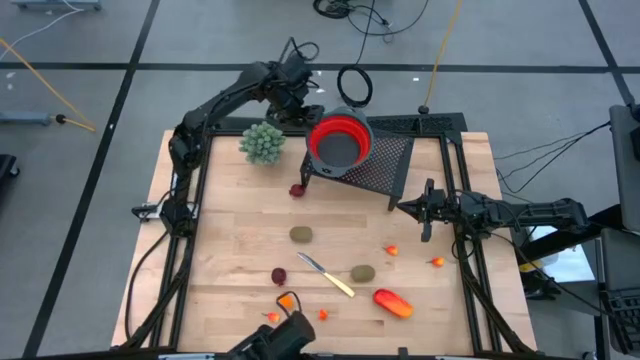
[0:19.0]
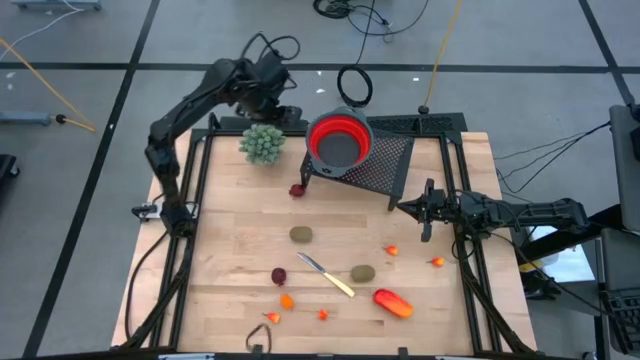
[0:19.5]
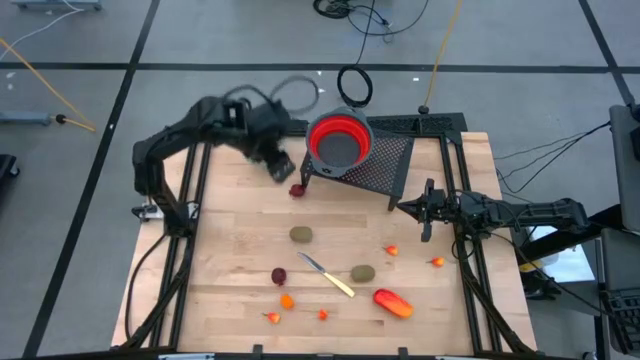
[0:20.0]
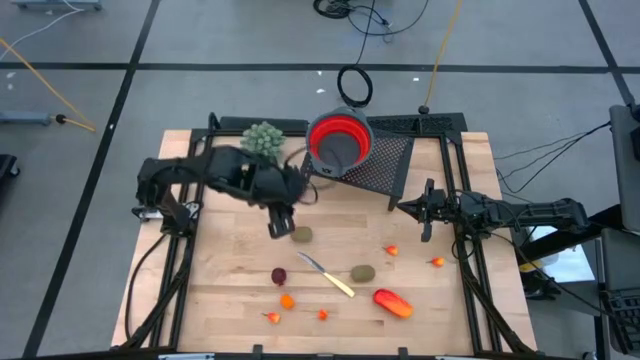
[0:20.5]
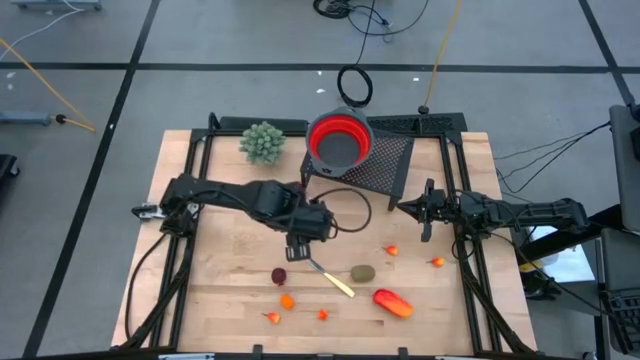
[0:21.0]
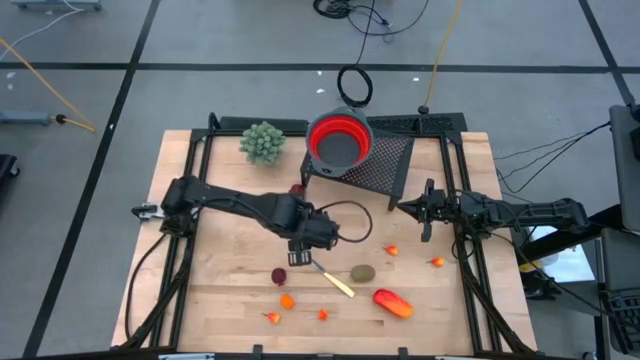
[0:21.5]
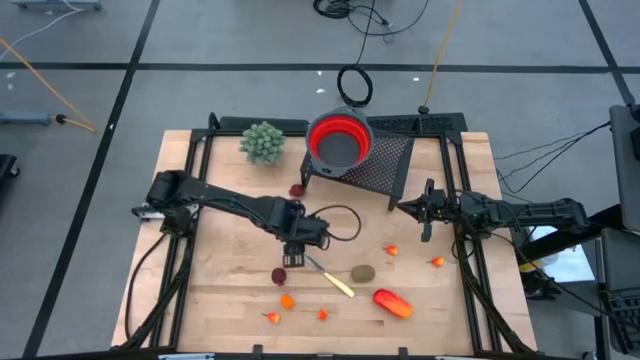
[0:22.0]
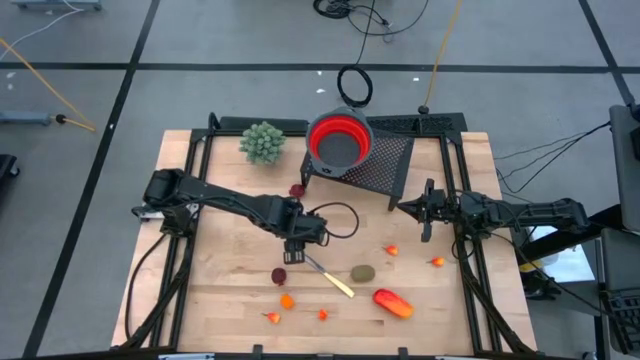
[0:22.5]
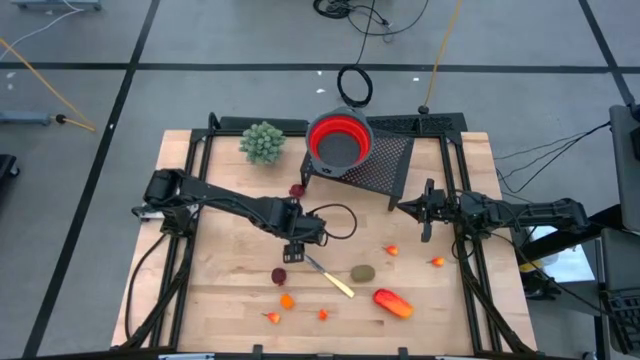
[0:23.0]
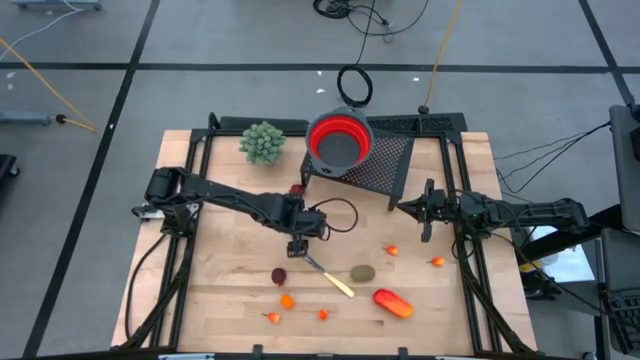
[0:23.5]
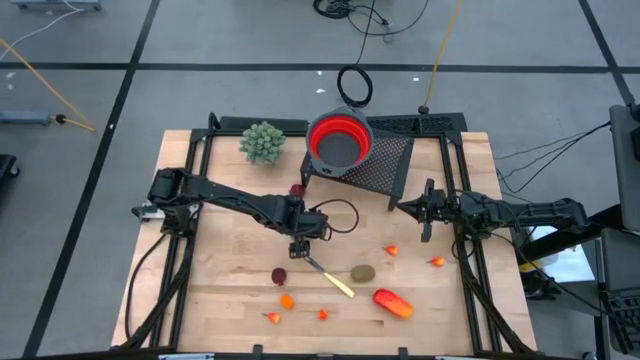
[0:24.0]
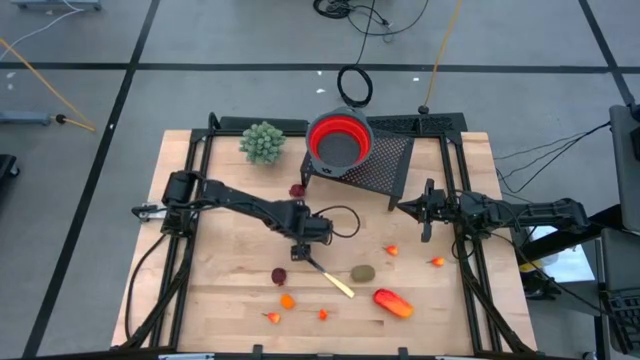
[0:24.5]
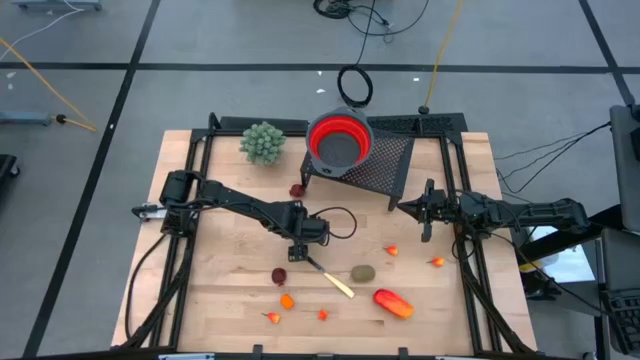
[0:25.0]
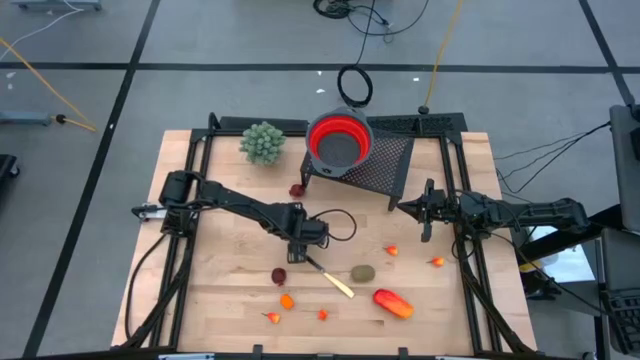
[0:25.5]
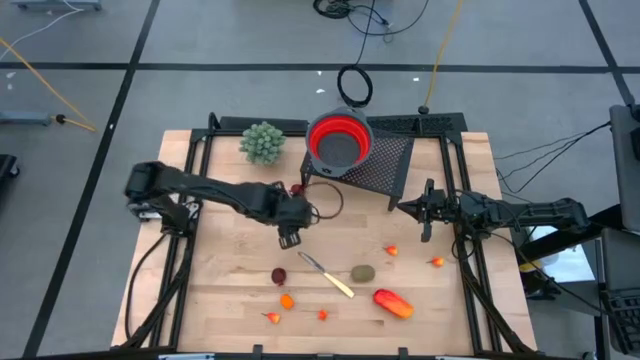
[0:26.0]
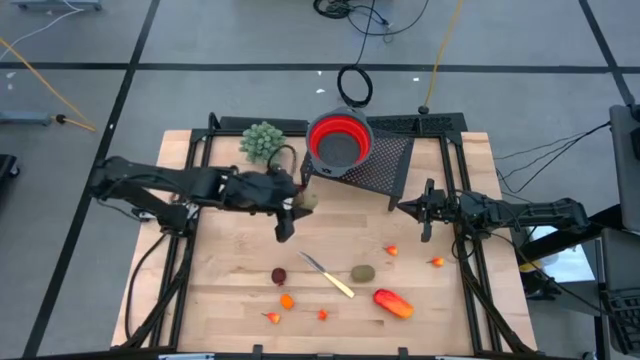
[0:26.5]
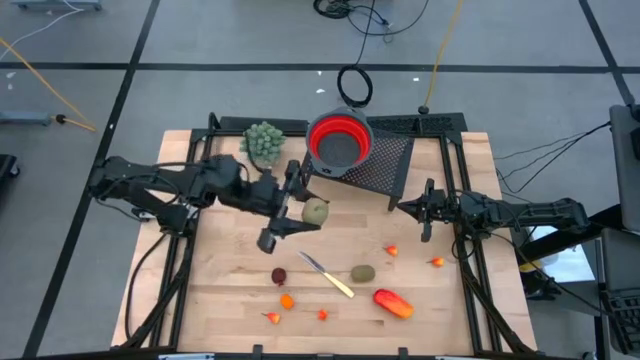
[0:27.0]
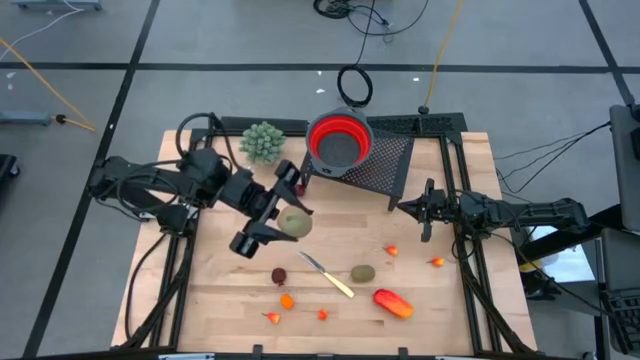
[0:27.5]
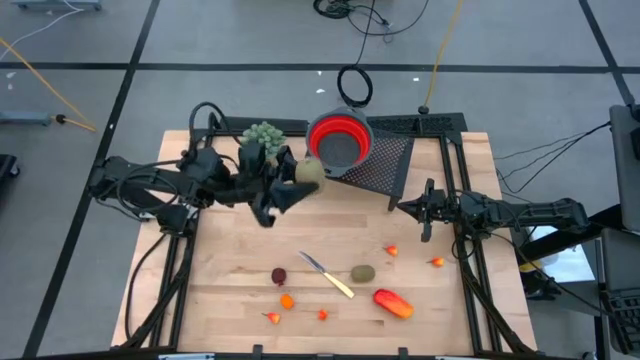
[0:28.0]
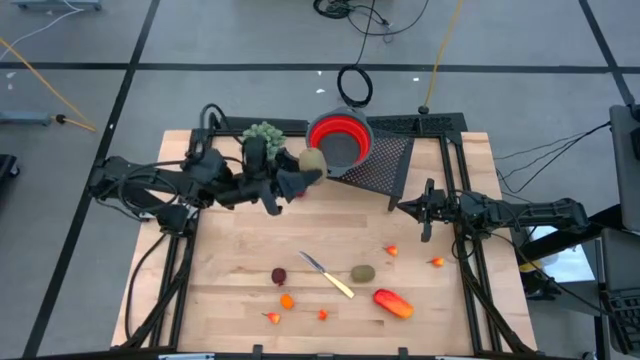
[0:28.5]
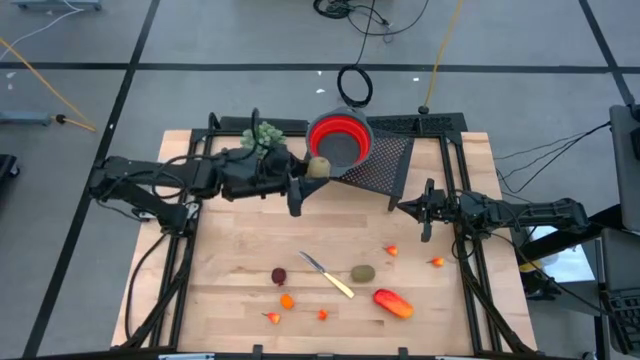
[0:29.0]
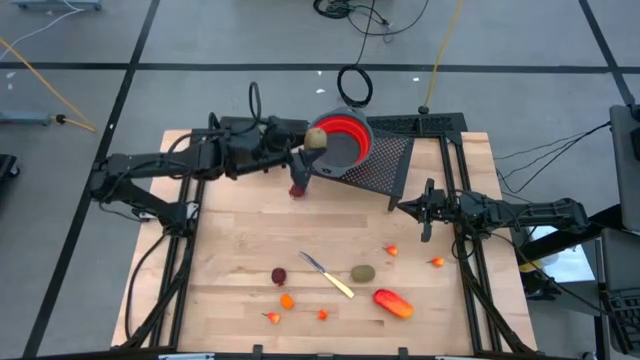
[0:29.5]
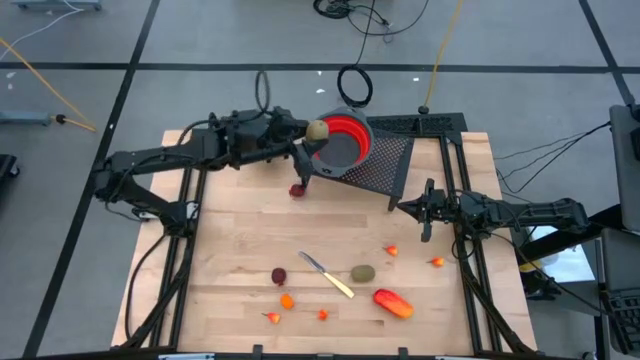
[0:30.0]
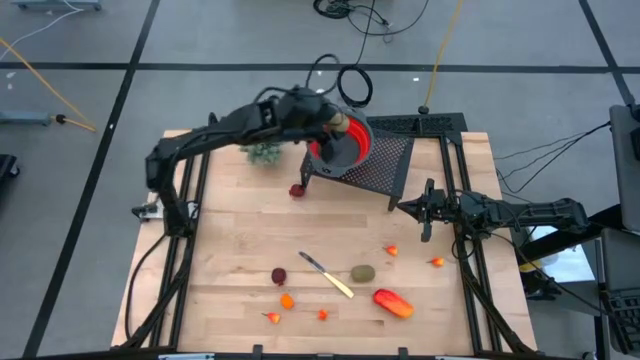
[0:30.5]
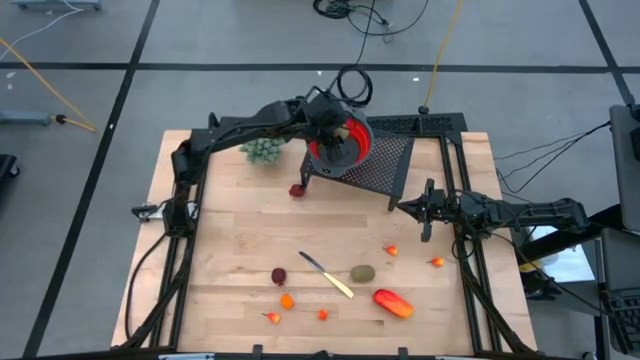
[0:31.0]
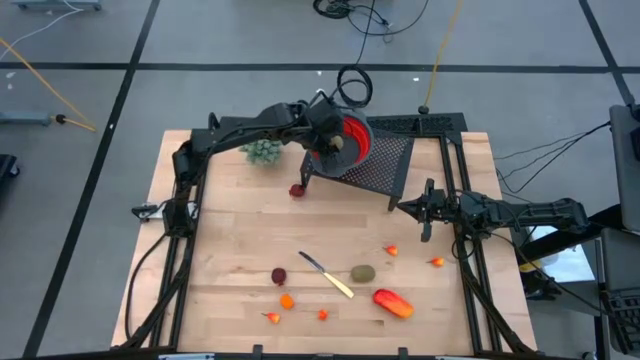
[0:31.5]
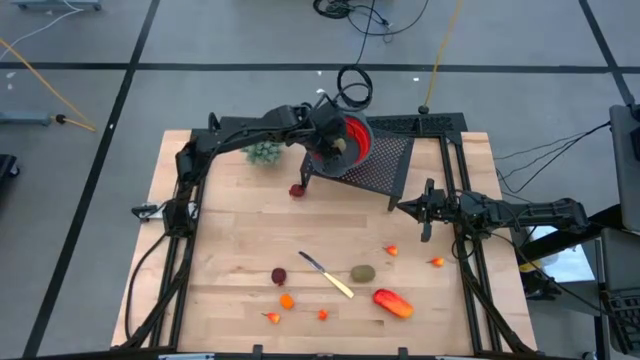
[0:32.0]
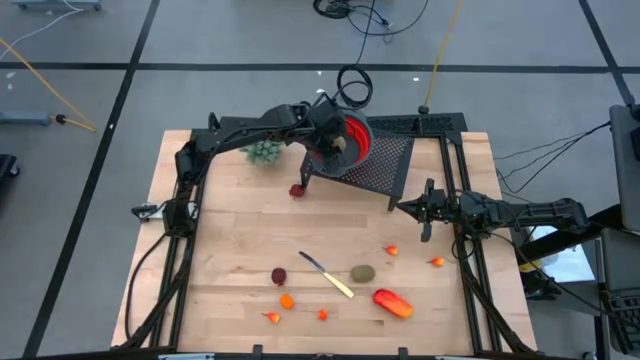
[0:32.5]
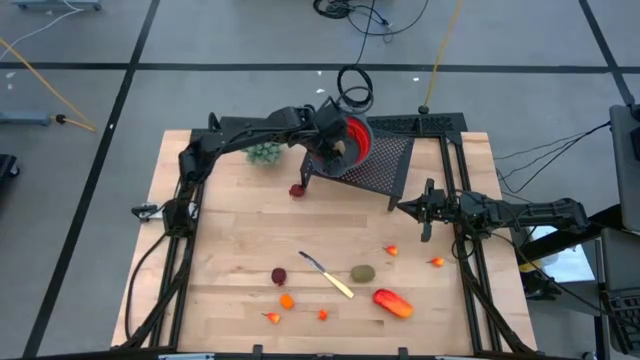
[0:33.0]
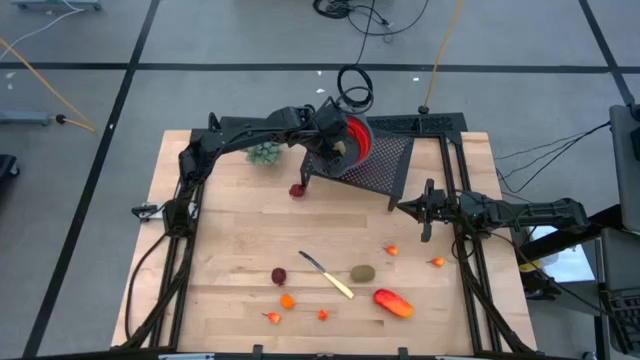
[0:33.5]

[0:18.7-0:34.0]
Task: Pick & Place Fruit
Put the brown kiwi into the red strainer bowl on the shelf

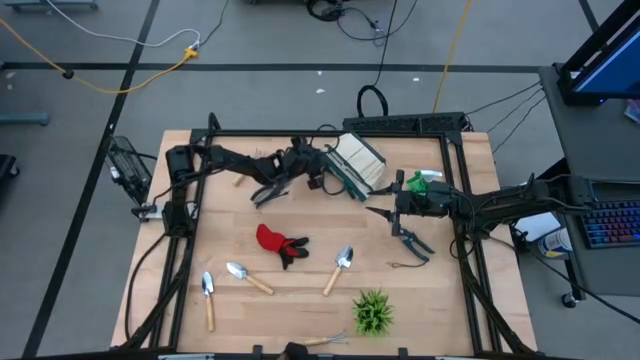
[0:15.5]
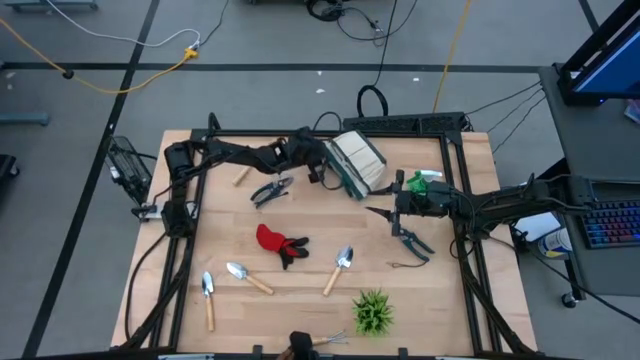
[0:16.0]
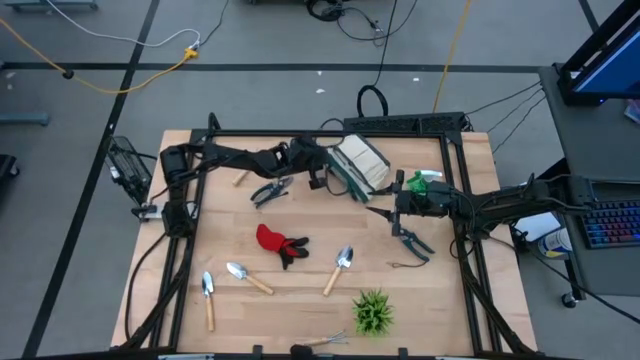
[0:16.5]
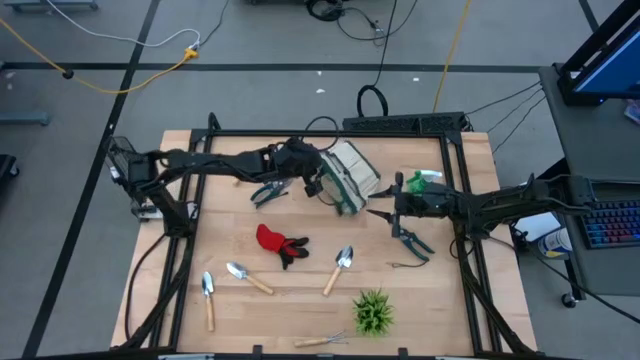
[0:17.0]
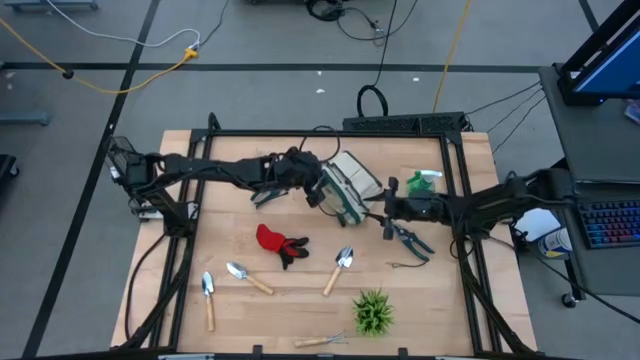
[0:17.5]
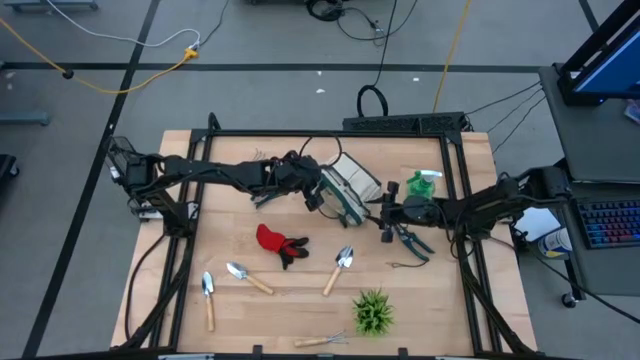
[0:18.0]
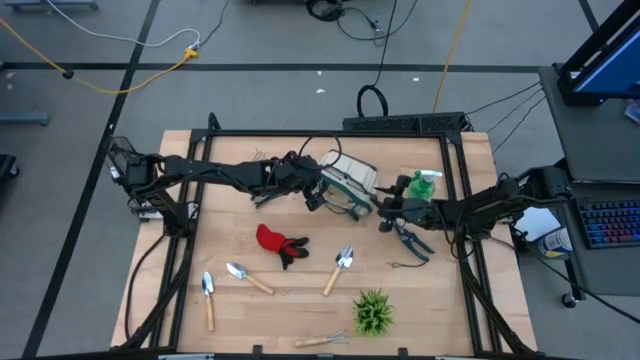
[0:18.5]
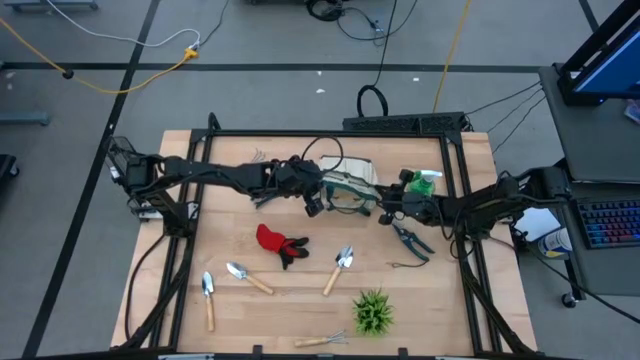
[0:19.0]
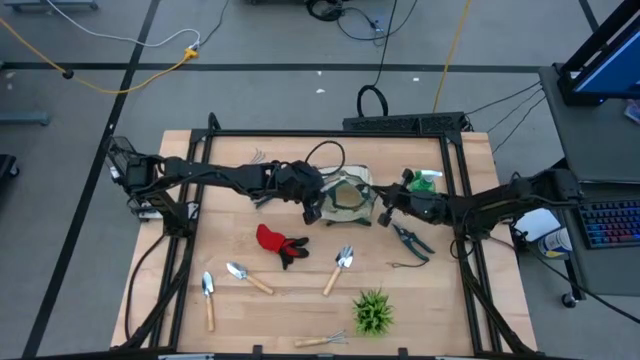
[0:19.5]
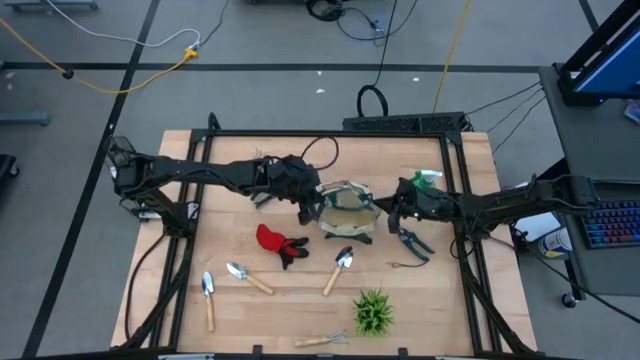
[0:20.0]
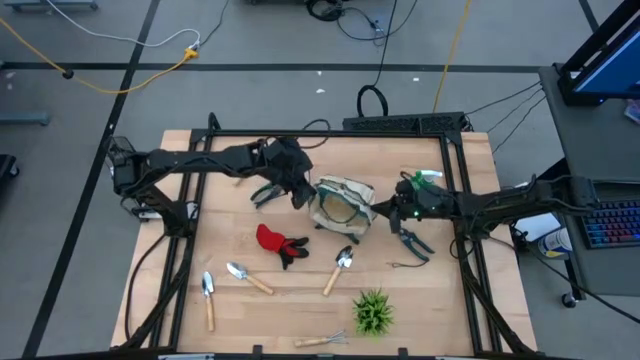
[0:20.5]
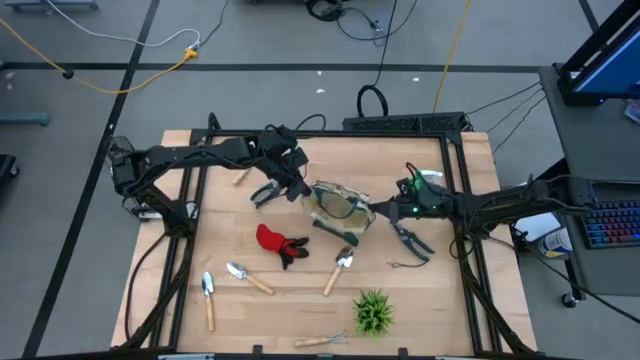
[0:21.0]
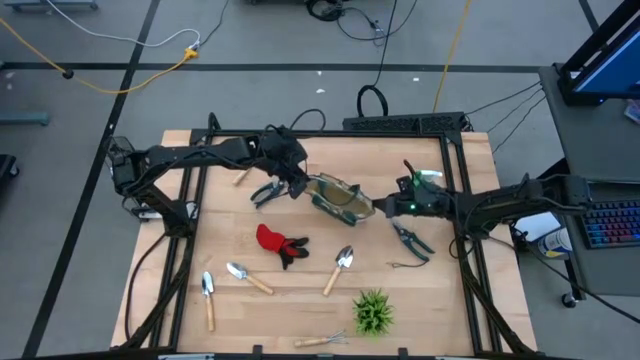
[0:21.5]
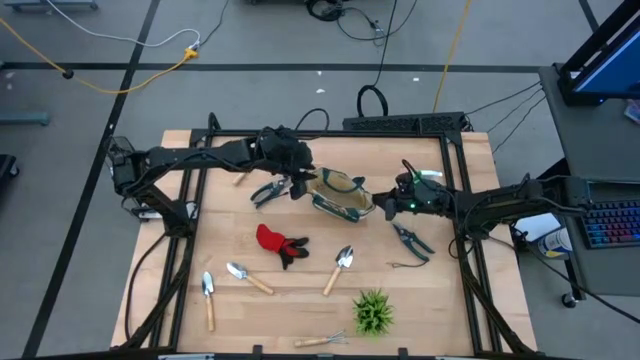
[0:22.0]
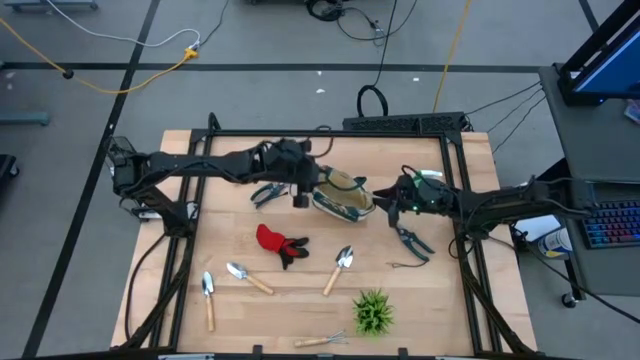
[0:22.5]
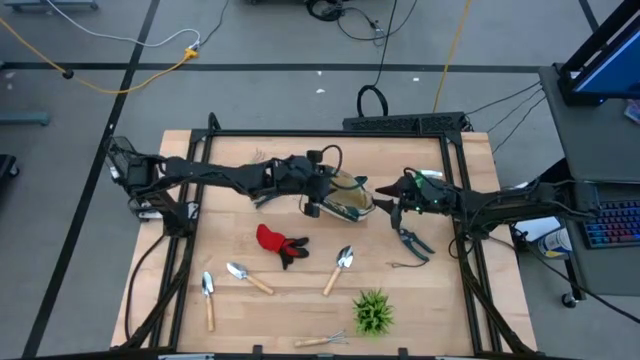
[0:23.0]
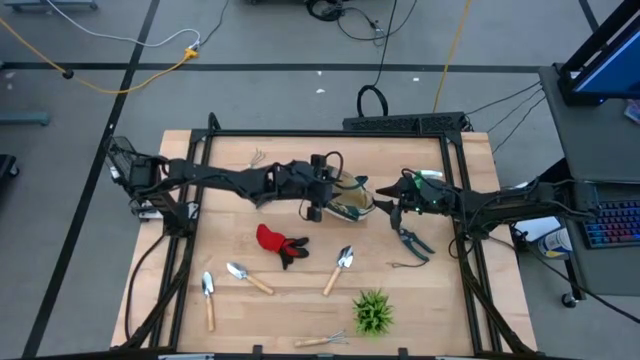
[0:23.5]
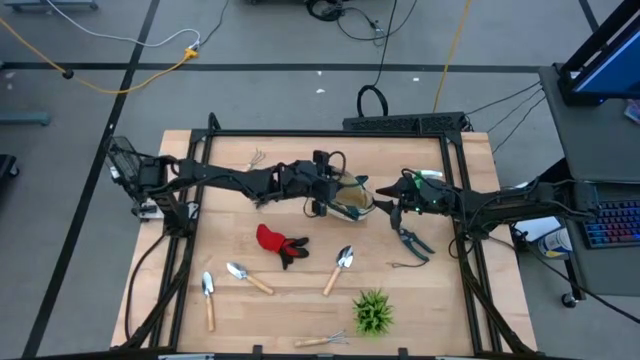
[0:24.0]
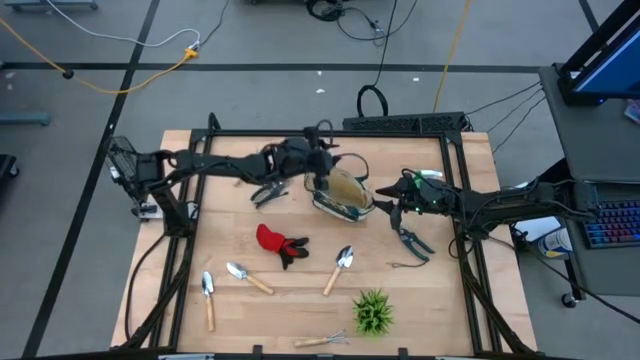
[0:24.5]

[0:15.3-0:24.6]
Task: Pick & Place Garden tools in Gardening bag
Prepare the gardening bag on the table
